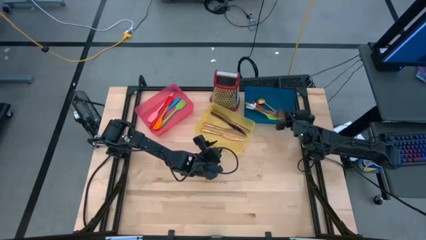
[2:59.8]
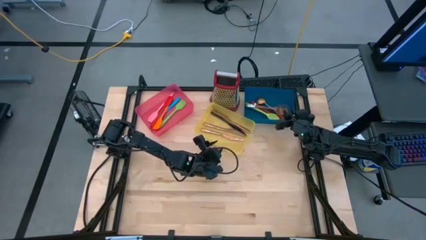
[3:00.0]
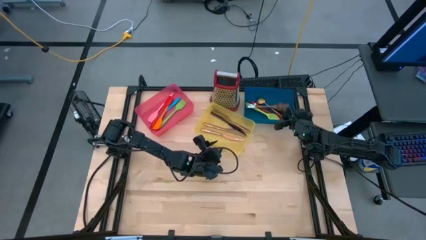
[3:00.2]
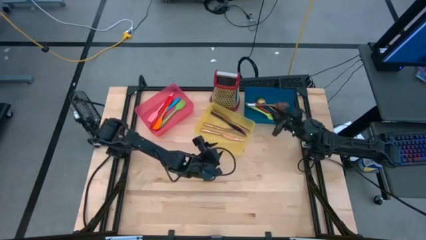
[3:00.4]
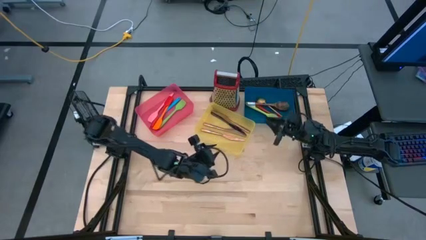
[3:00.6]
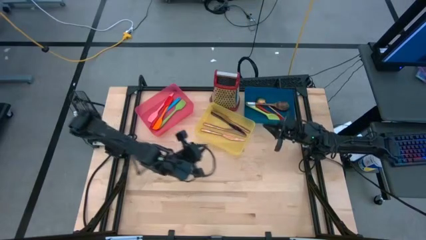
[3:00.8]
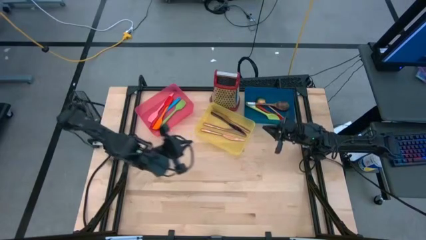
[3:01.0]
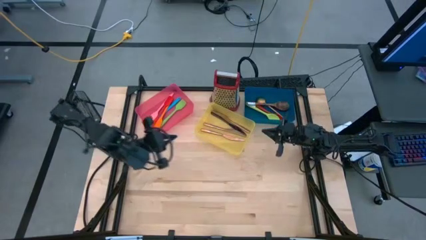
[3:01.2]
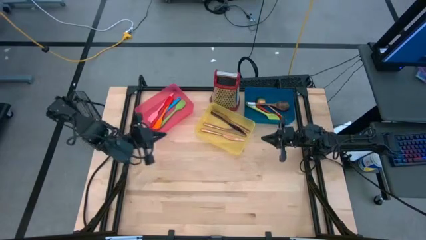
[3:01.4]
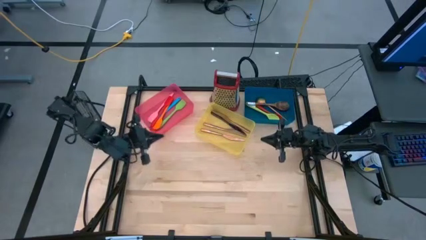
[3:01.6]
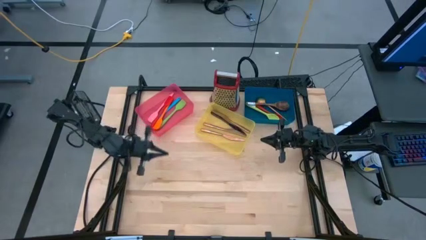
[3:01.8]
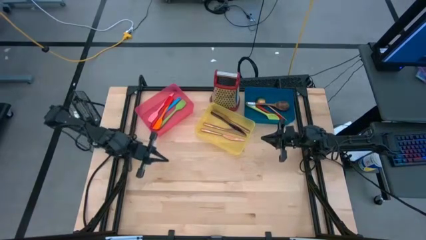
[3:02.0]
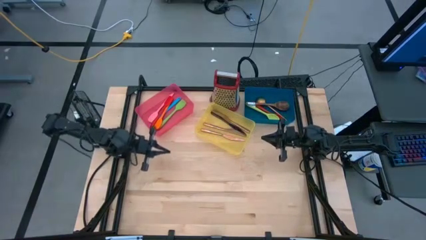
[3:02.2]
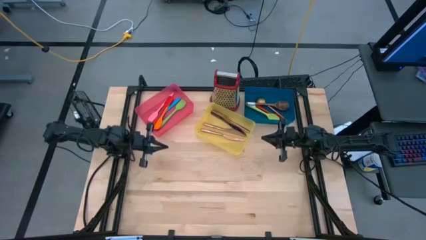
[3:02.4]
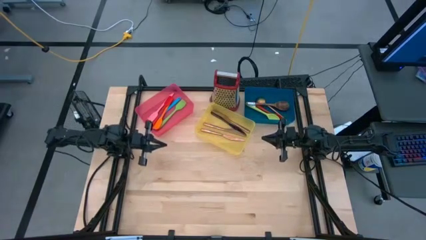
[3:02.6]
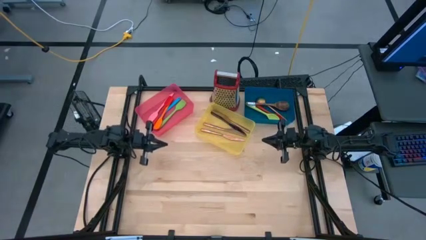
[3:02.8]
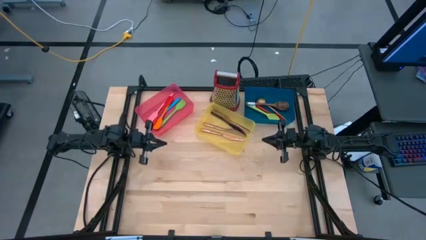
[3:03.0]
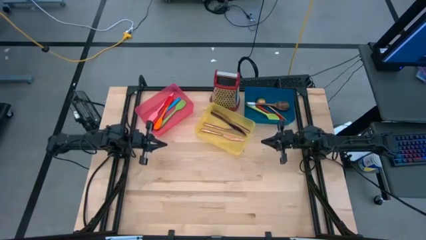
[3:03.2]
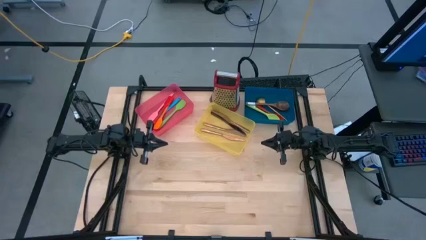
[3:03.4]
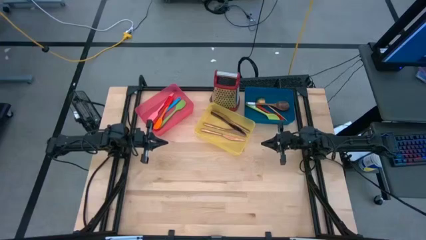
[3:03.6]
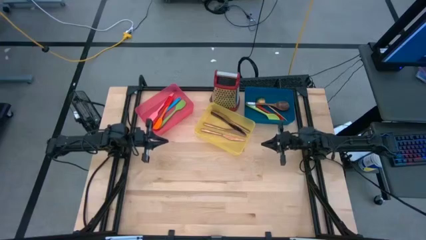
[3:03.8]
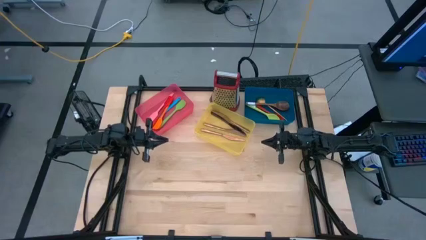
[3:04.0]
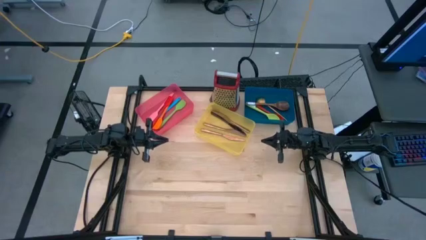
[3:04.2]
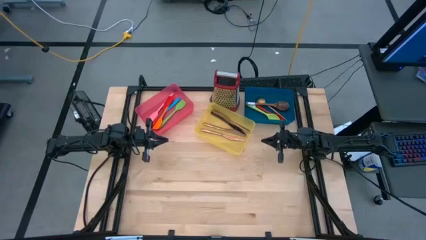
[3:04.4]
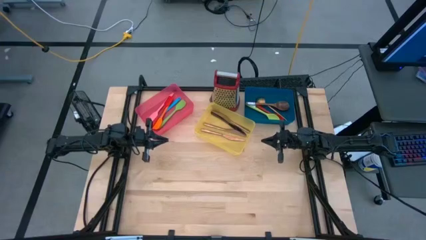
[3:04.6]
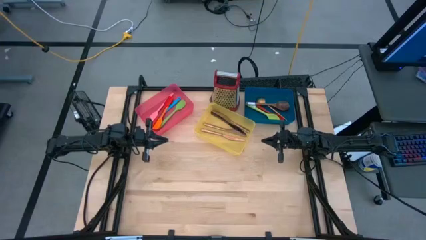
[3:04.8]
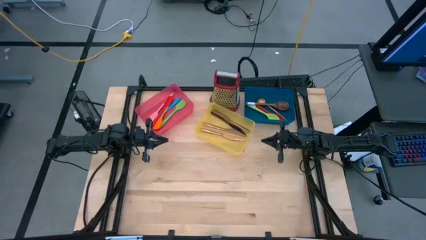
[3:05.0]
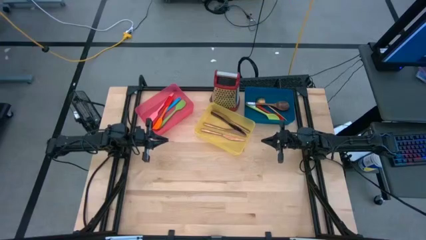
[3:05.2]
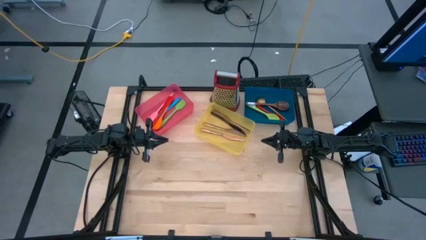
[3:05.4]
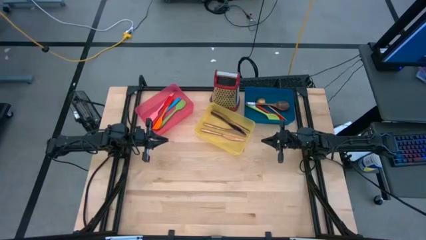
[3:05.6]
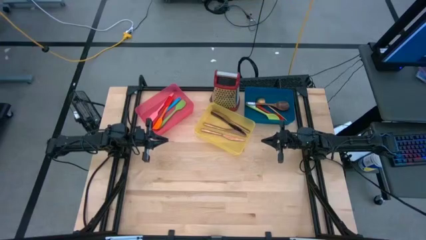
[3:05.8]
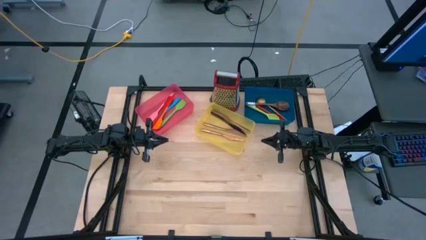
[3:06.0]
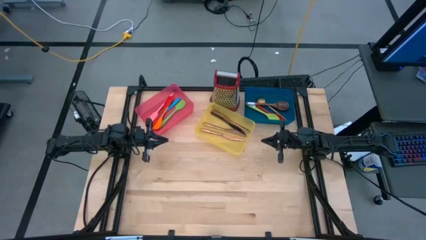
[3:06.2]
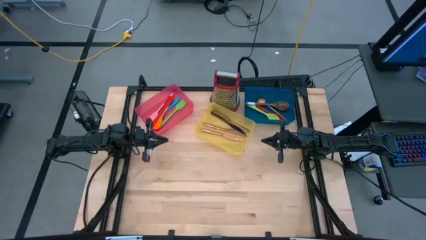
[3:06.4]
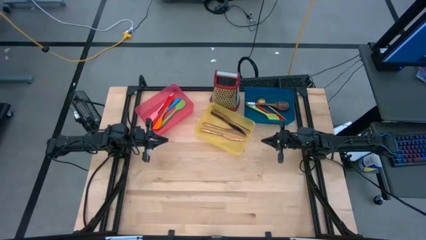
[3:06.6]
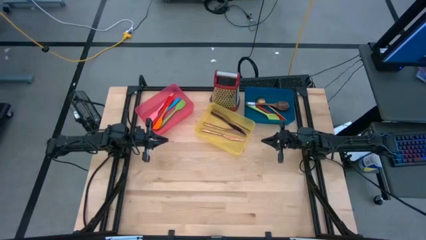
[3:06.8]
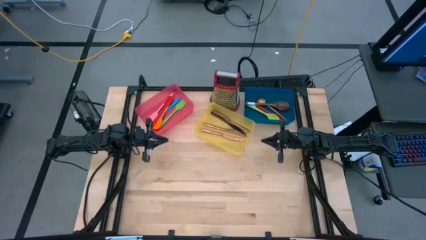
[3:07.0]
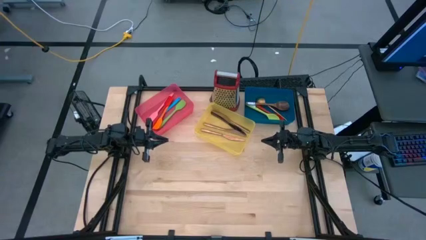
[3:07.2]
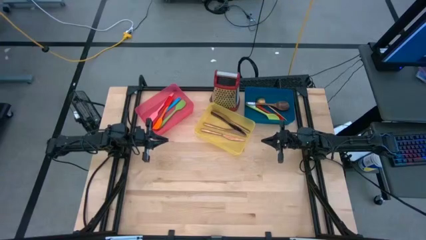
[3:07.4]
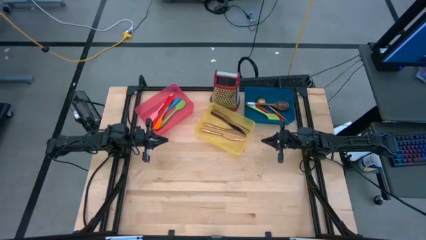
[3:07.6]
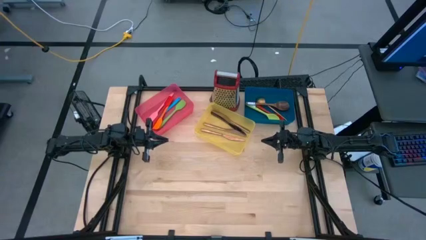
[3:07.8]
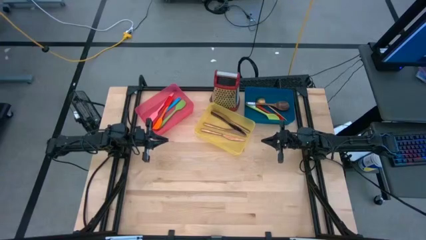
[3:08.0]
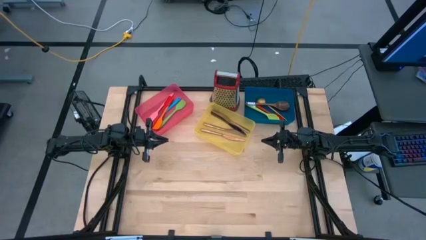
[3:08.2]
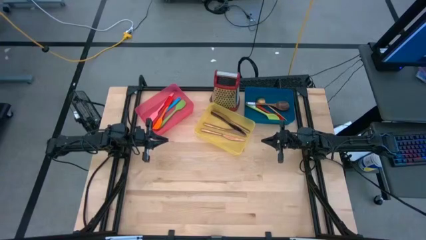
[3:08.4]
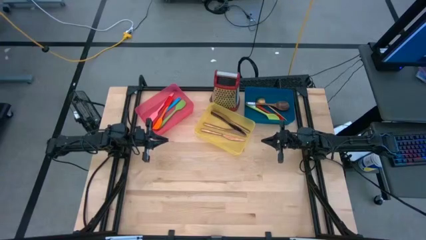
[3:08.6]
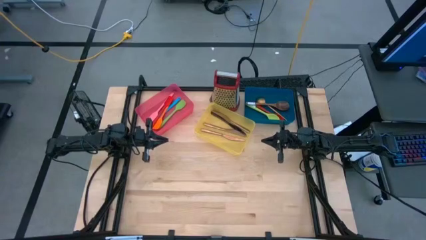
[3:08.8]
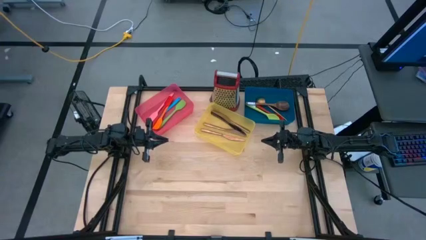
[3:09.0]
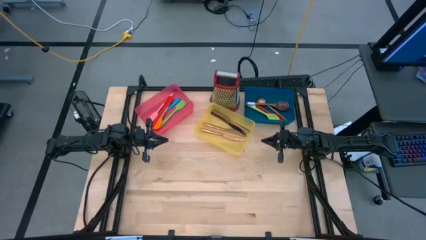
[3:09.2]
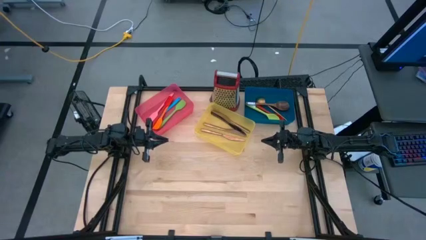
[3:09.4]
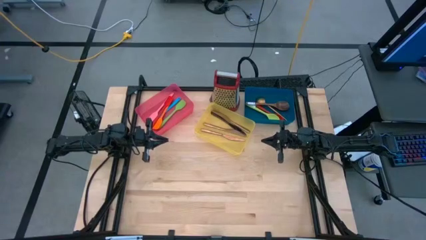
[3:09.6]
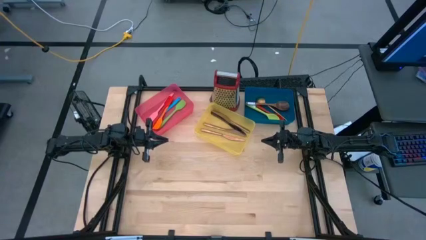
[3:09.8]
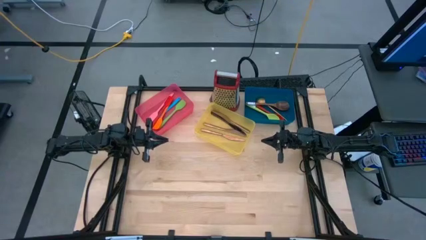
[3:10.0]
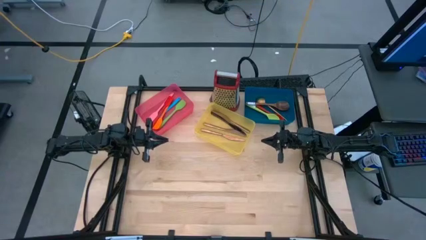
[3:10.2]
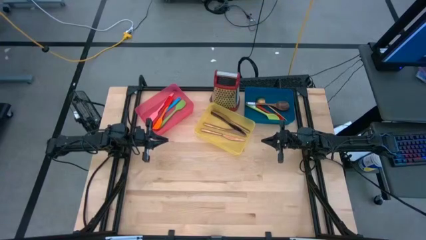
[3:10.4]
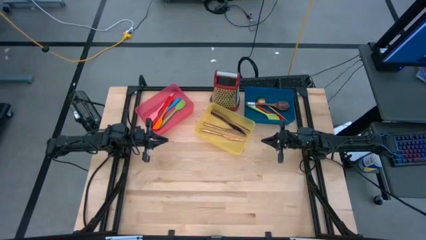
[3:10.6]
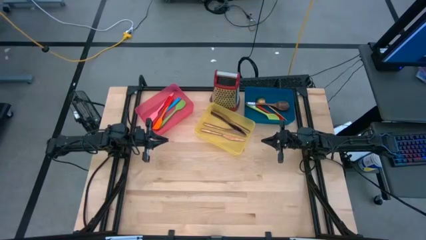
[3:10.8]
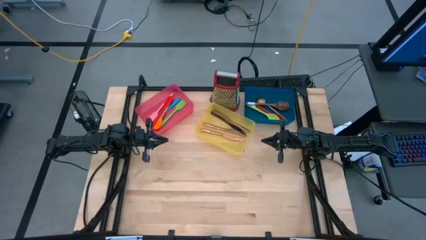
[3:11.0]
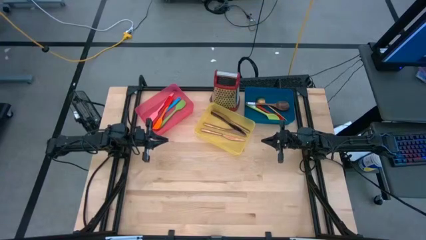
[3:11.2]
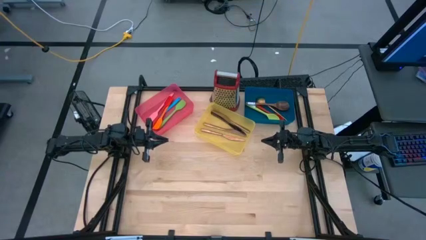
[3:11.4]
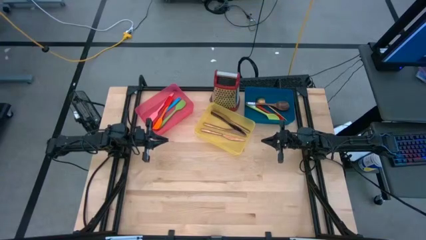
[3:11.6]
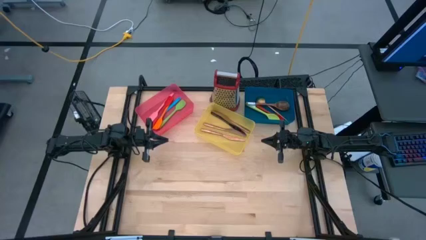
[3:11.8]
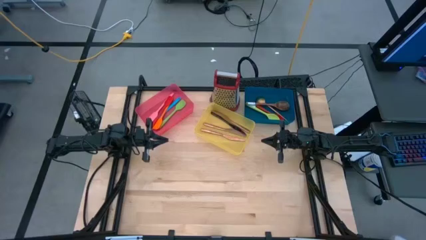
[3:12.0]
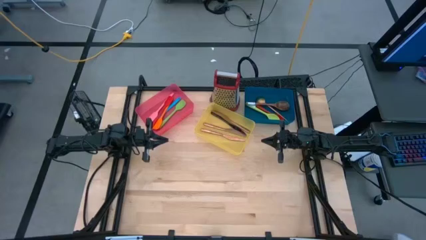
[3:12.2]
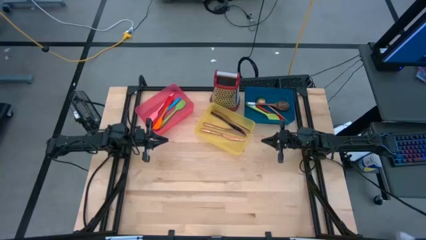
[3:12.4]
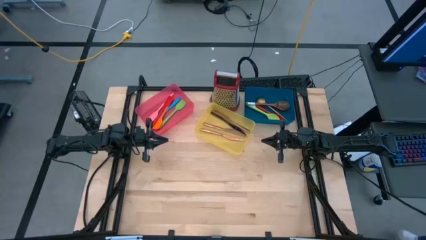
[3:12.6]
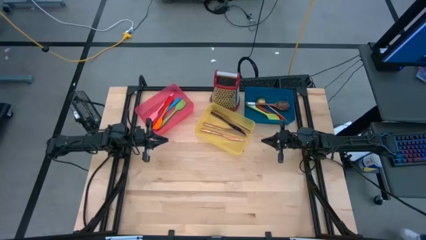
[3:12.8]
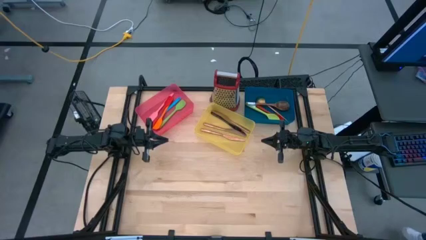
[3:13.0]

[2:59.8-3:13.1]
Task: Pick & Place Kitchen Items
Return to Home Position

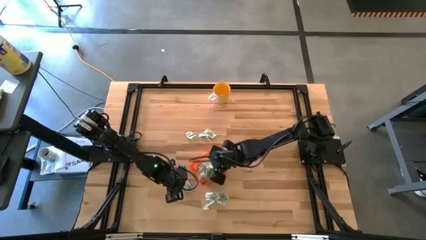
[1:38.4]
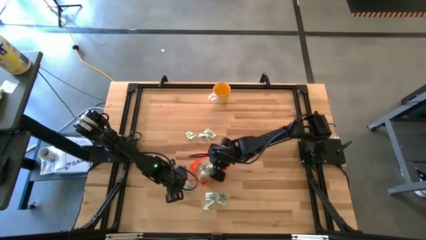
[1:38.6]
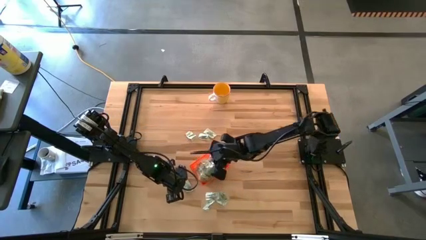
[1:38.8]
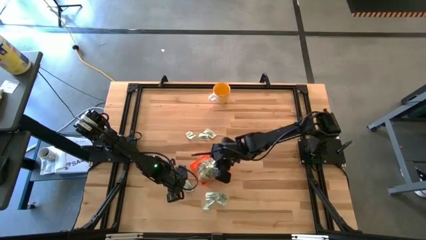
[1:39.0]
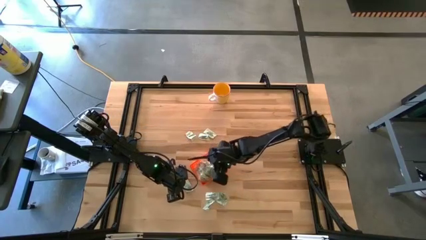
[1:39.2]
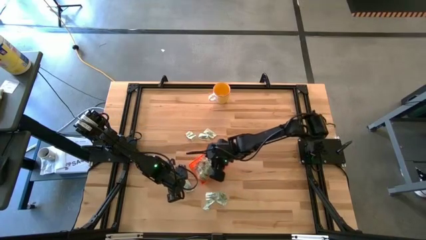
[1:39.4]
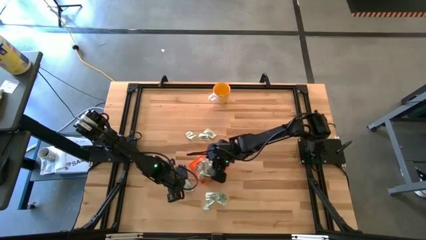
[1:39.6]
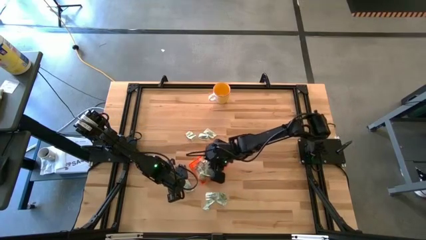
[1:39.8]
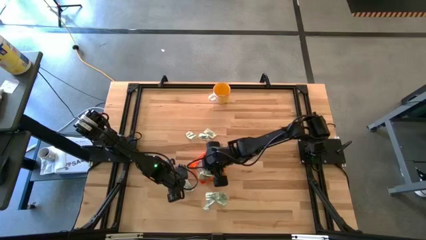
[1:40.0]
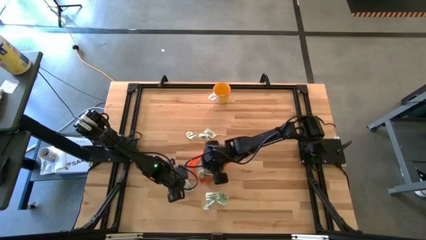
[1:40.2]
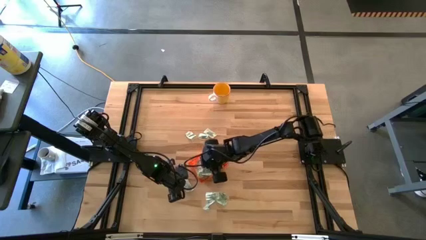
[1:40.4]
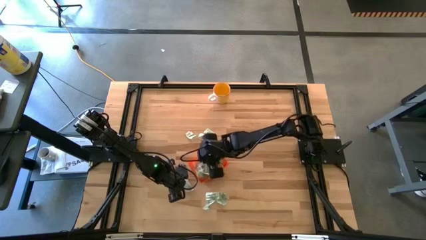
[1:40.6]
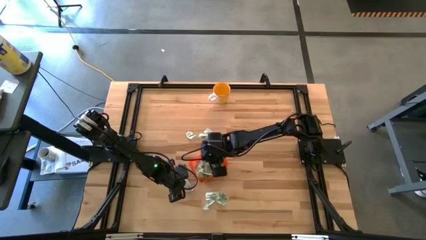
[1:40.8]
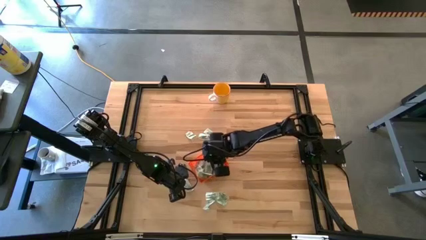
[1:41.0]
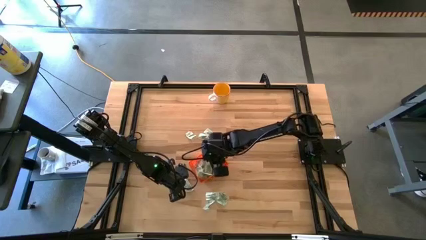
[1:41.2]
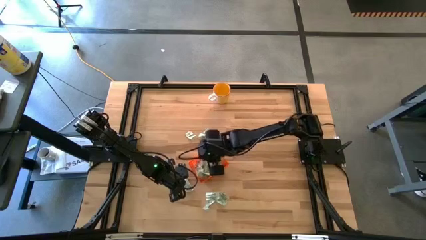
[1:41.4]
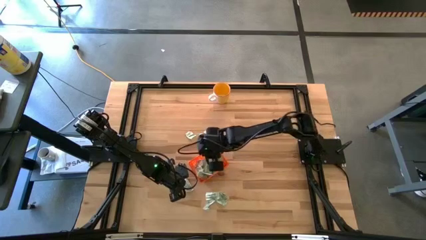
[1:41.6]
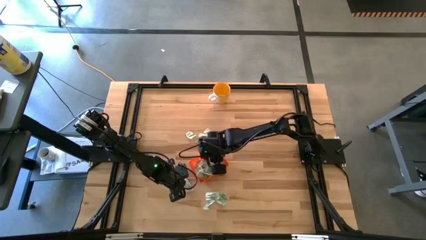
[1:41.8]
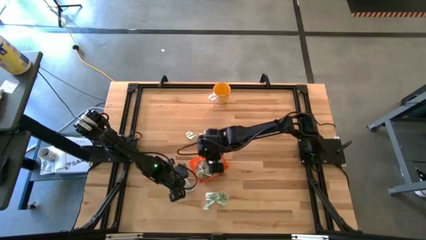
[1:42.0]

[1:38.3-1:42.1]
Task: Pick and place Stevia / Truvia into bins
Adjust the stevia packet inside the bin

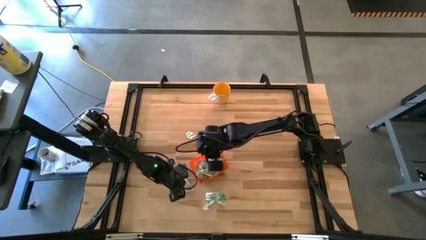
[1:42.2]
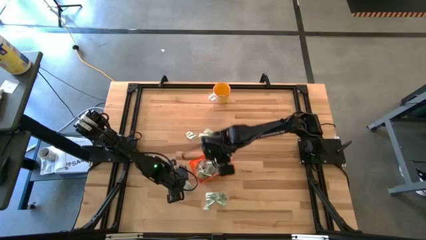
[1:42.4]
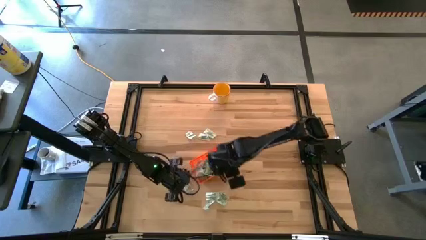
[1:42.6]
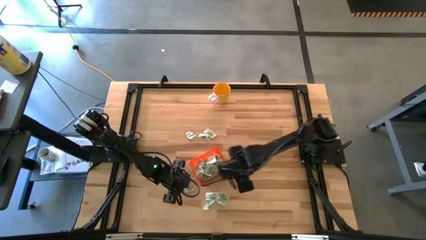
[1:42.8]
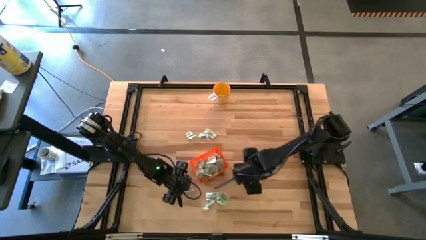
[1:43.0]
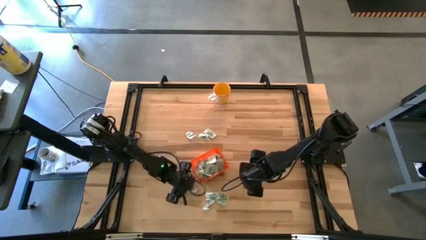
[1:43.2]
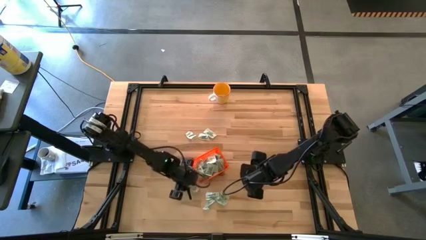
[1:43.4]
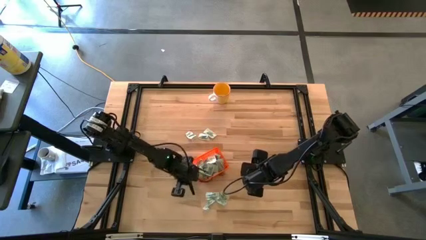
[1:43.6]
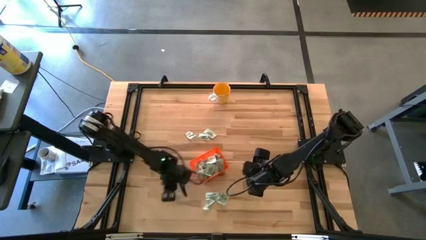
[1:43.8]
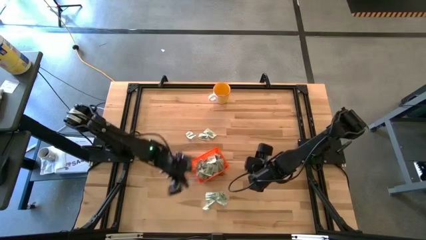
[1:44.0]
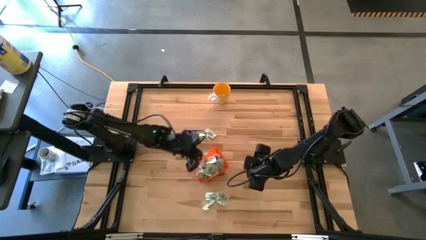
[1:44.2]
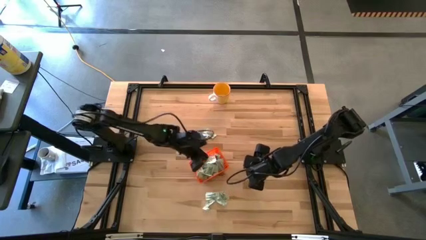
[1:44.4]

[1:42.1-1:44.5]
Put the stevia packet into the bin
